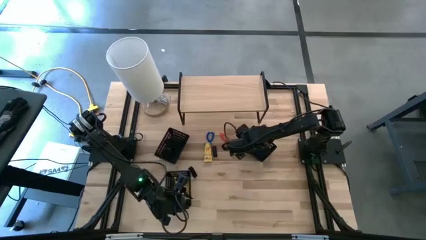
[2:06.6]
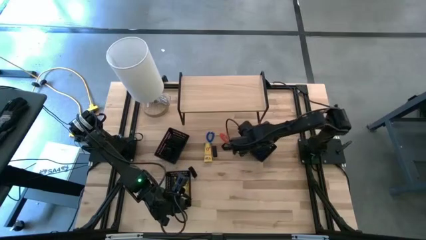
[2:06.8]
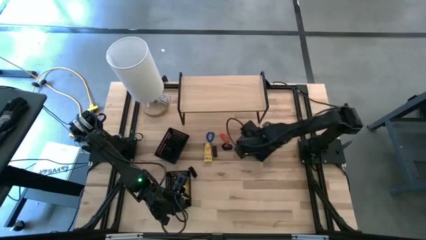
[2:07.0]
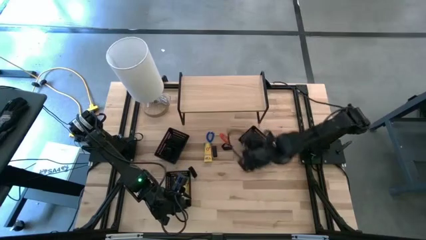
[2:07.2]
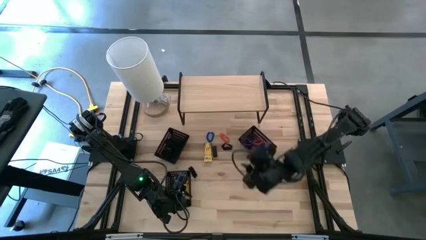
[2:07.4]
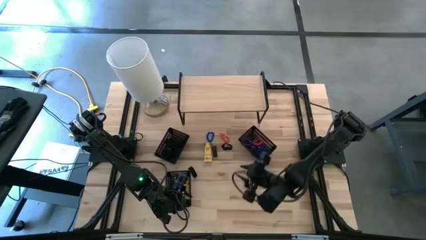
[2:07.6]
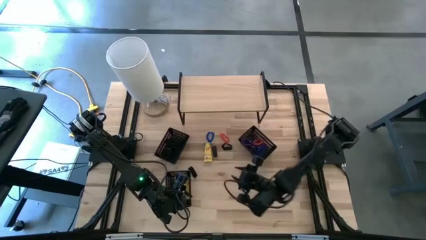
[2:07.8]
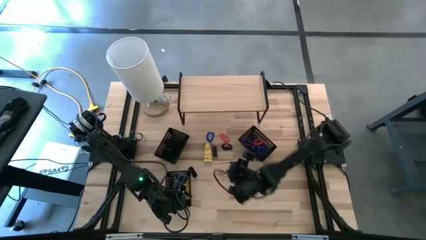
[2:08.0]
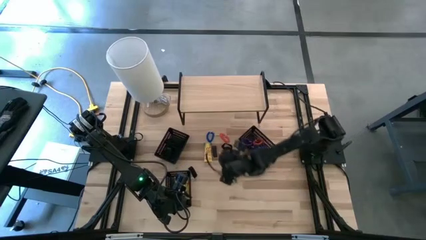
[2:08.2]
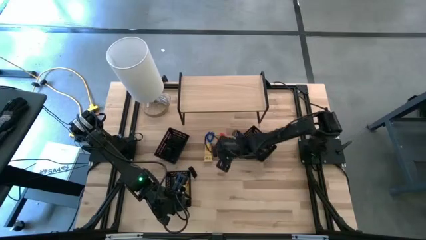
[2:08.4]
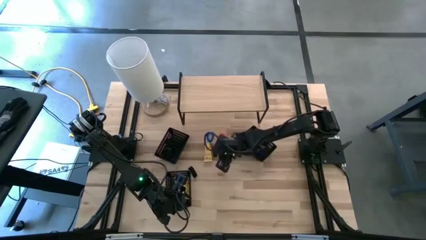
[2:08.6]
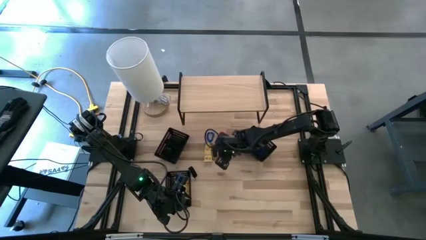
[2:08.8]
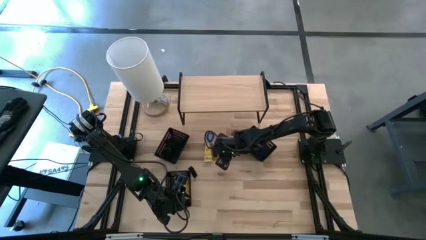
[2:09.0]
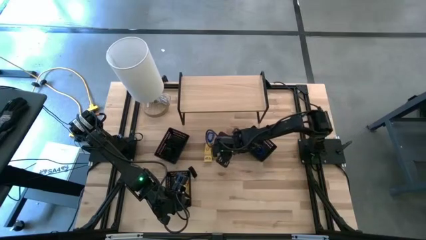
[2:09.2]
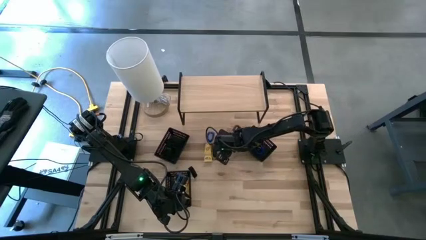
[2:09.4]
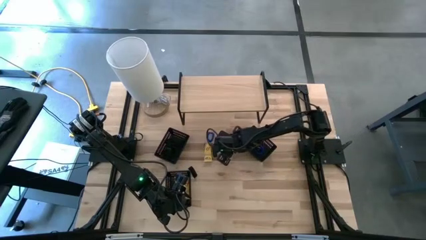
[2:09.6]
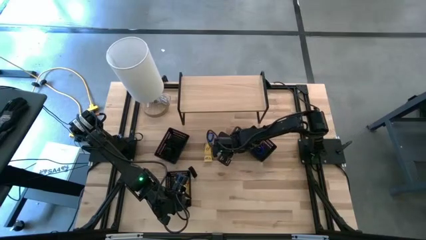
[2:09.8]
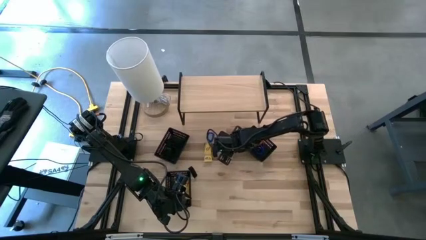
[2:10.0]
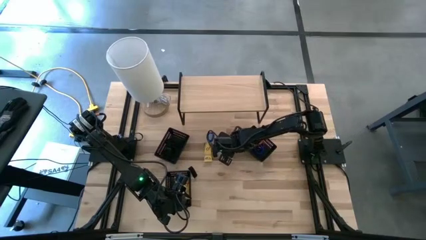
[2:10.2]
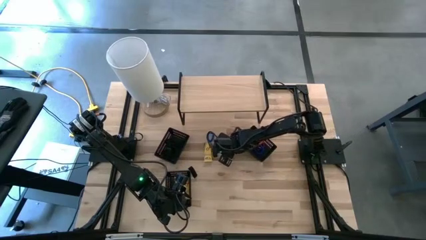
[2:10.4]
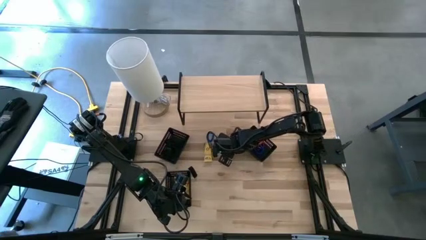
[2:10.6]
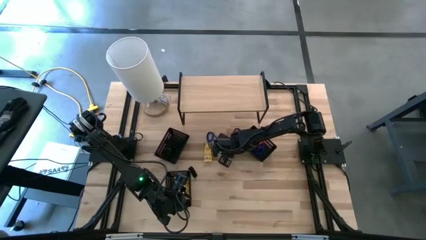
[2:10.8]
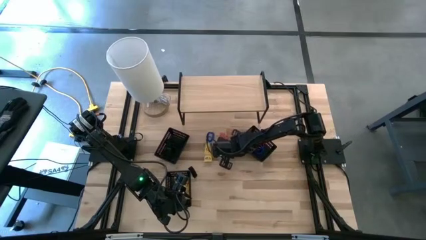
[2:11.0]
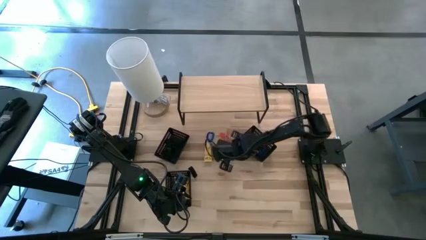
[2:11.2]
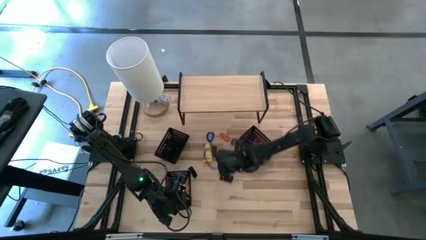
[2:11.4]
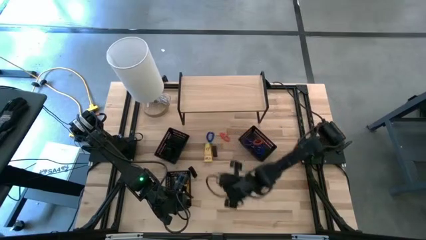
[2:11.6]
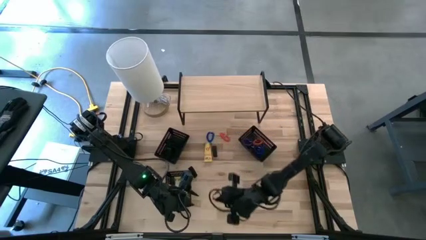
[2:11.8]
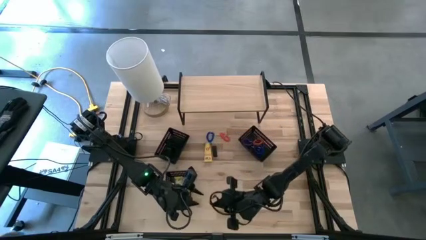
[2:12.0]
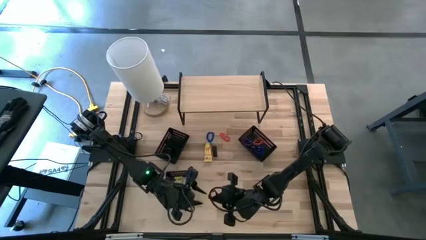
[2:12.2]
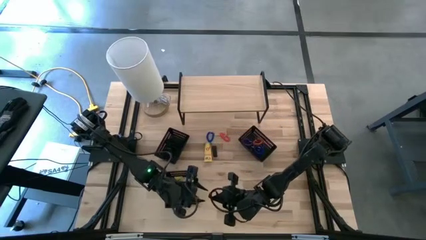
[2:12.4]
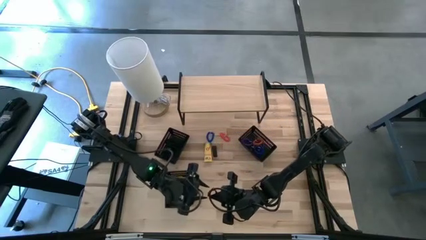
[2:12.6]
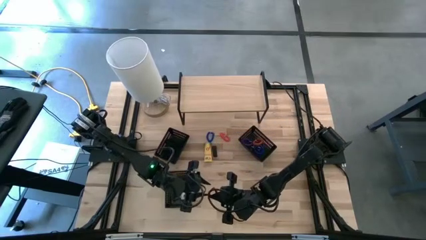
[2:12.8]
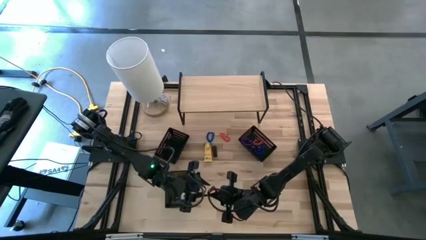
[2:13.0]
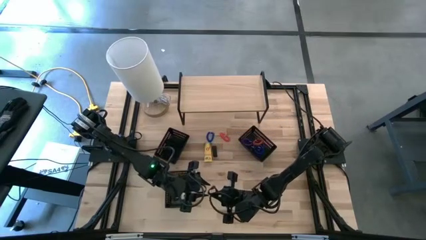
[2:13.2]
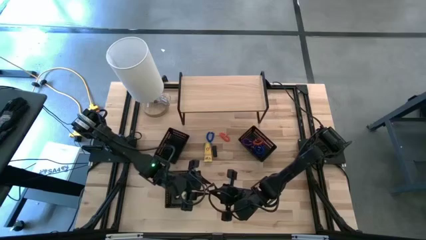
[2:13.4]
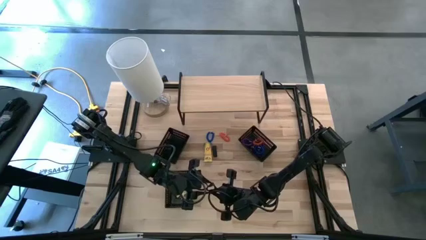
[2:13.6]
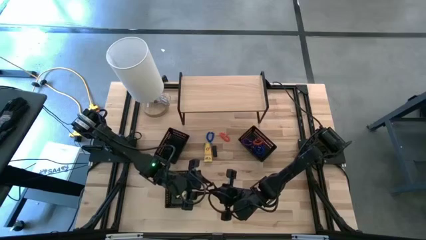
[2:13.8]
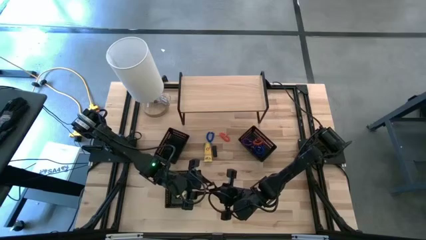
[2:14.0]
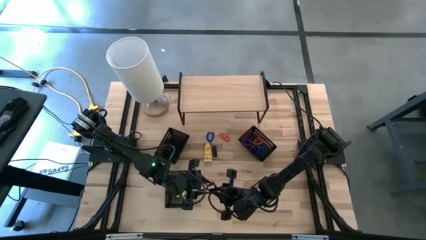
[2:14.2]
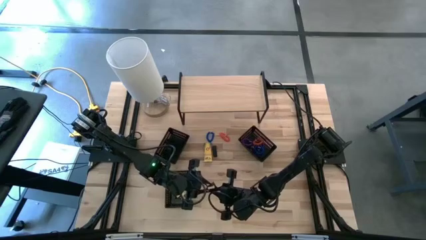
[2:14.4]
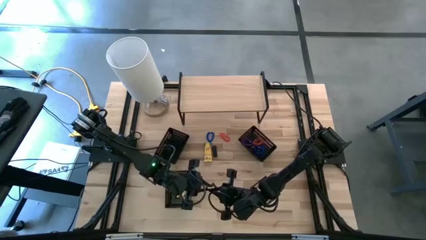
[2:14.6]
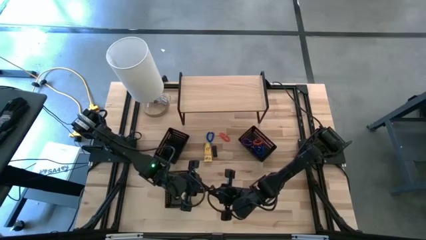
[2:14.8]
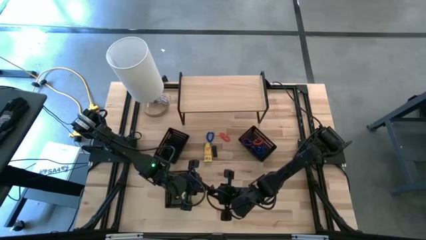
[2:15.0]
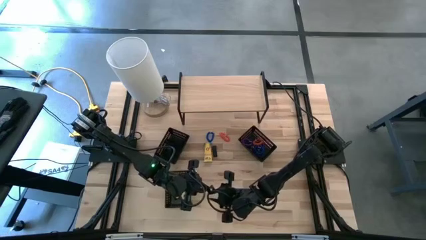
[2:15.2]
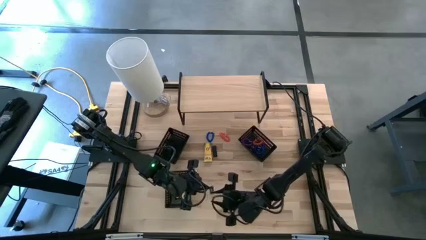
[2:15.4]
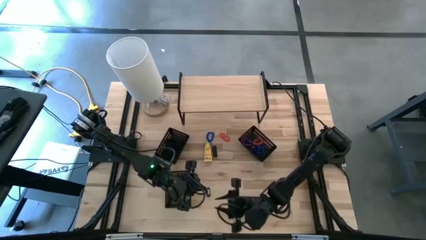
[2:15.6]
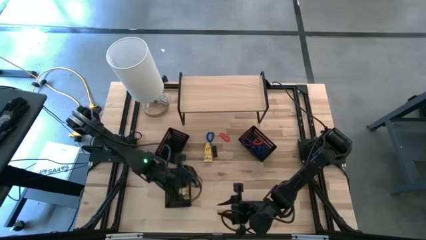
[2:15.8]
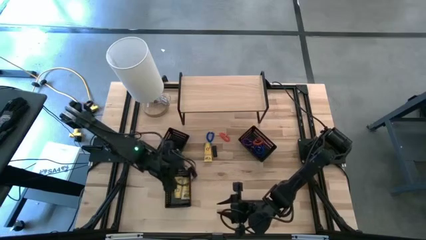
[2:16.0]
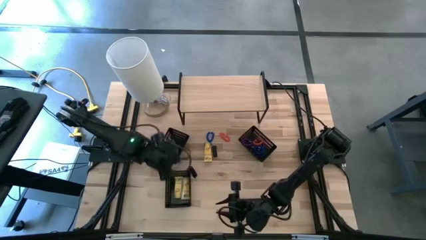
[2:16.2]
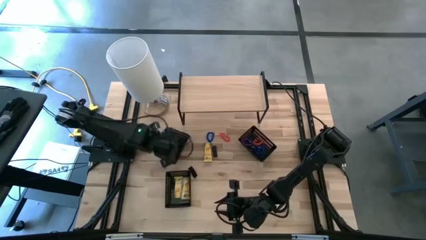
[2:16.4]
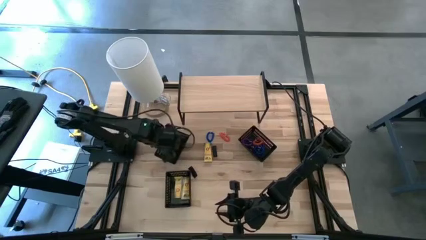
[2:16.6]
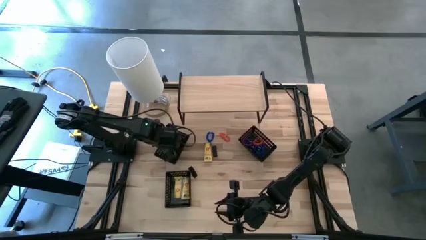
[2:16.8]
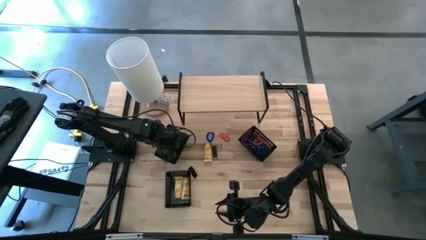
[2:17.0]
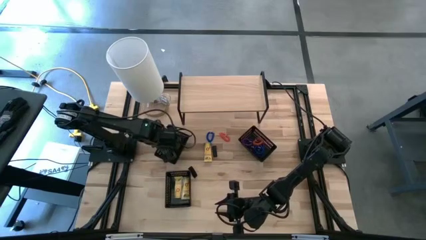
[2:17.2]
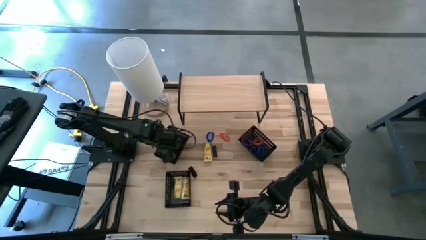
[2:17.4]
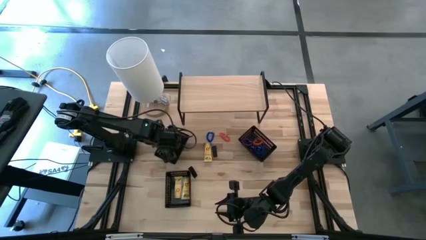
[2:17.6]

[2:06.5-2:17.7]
Task: Pick & Place Office Desk Supplies
Put the top right black rubber band into the top left black bin

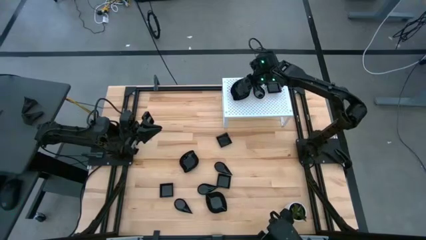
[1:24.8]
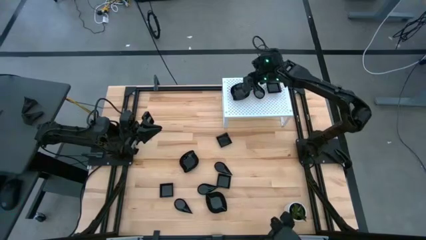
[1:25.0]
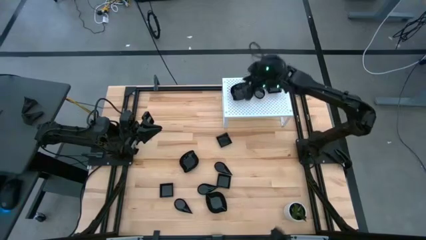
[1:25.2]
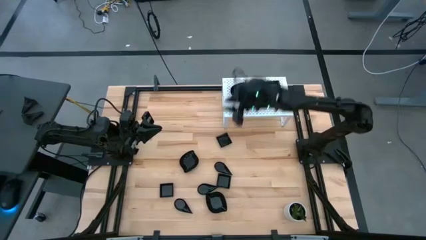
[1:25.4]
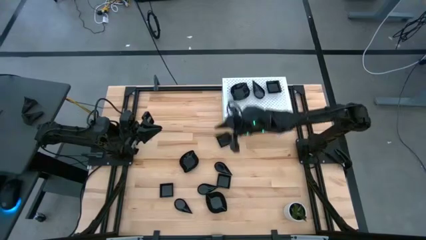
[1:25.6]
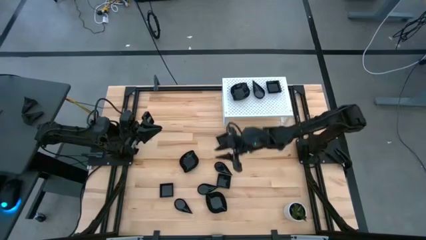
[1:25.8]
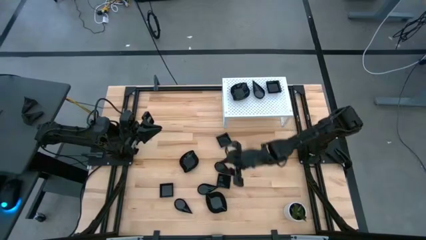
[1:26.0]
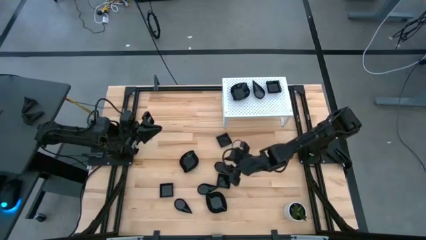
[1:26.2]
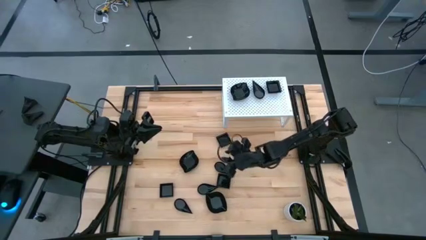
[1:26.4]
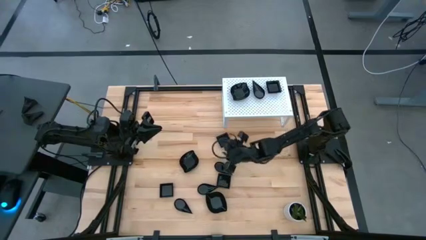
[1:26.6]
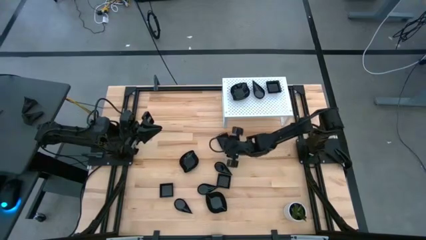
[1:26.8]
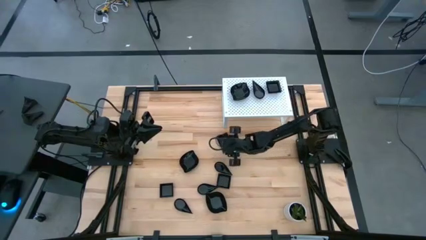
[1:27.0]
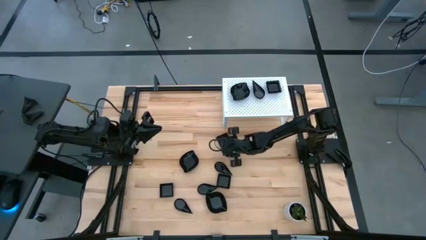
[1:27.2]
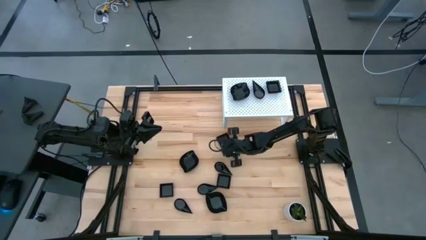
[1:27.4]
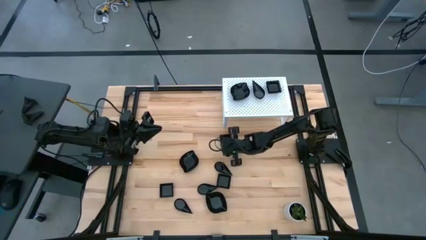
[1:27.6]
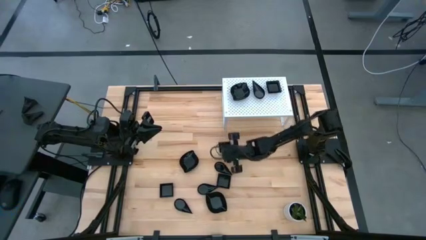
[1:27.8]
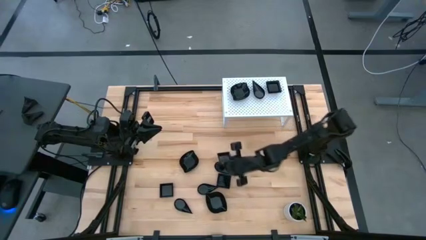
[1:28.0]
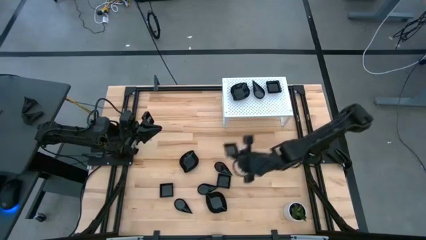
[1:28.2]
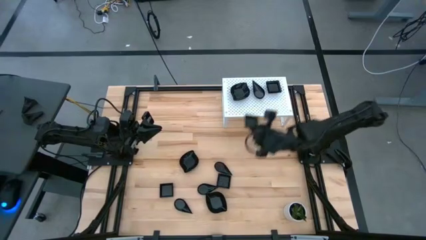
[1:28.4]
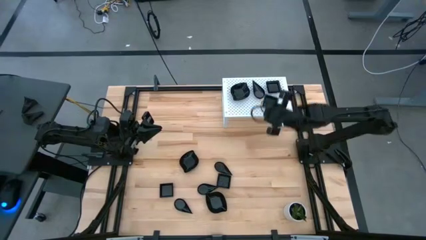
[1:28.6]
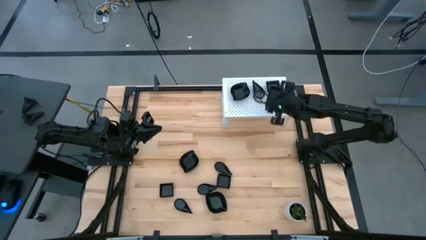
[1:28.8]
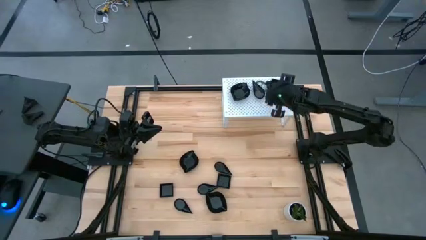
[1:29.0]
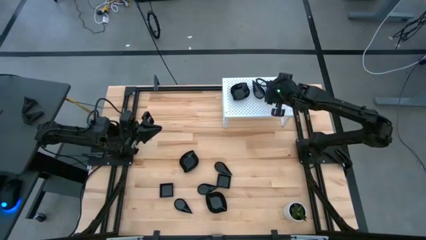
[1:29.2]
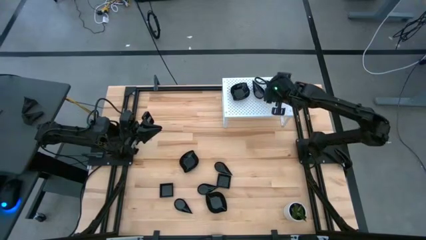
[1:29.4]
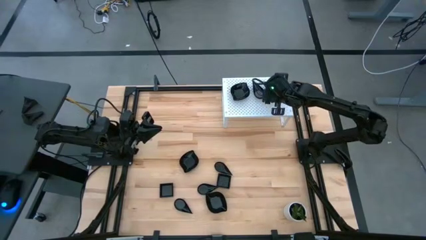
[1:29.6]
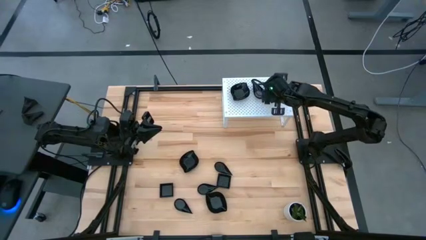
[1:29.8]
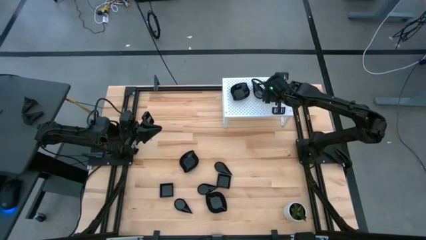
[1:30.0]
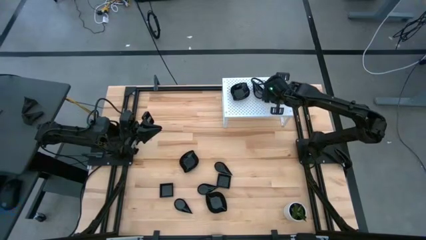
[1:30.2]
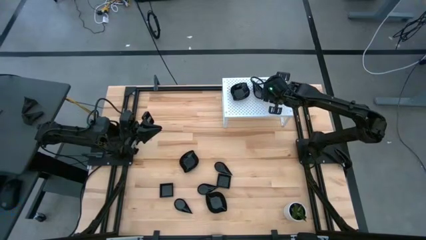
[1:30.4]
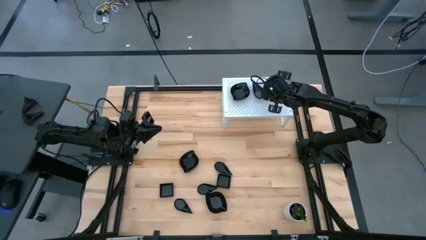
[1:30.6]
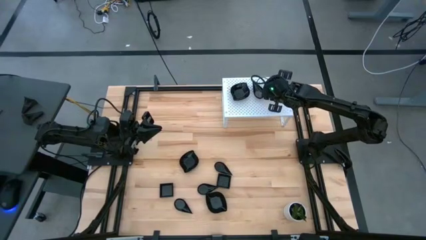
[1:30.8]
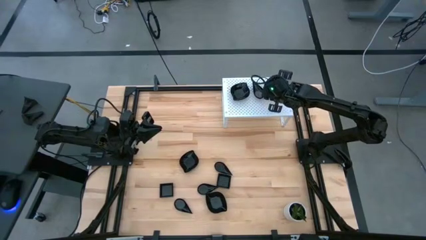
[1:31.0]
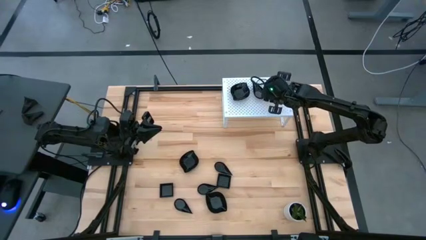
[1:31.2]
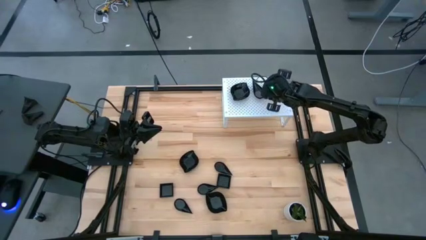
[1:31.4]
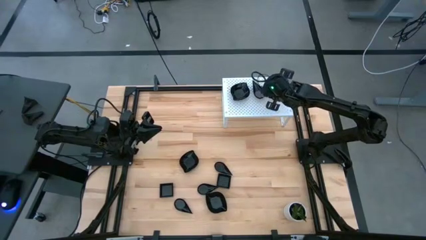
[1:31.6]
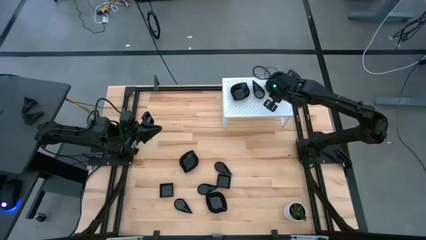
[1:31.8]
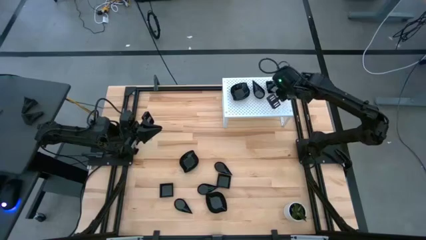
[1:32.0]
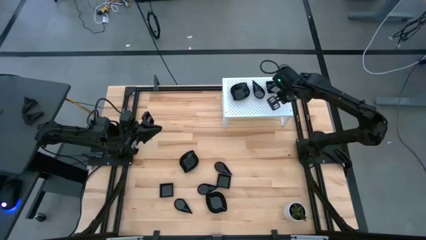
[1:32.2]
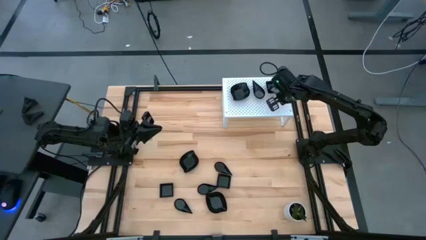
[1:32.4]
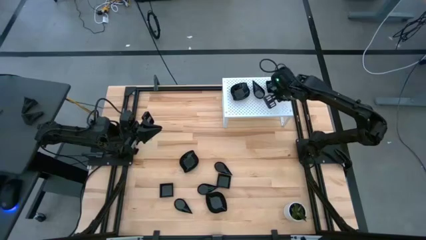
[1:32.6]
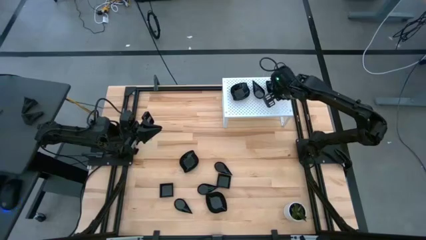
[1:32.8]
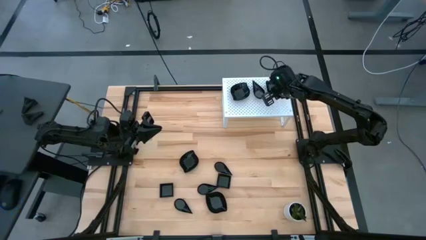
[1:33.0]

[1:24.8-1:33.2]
Task: Pick & Place Mini shaped plates
Stack the square plate on top of the square plates on the shelf
